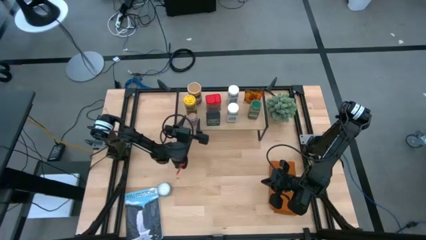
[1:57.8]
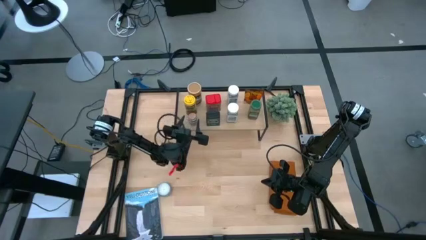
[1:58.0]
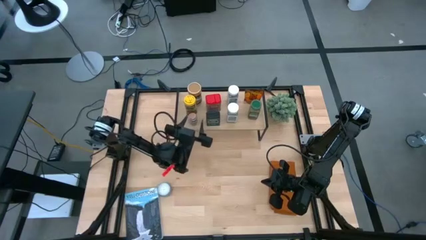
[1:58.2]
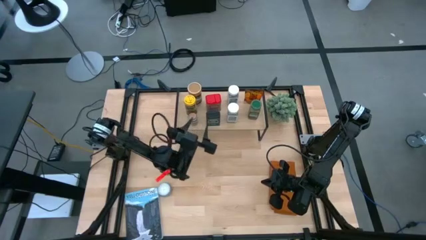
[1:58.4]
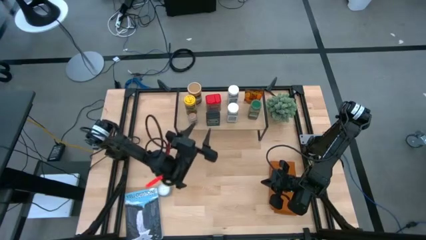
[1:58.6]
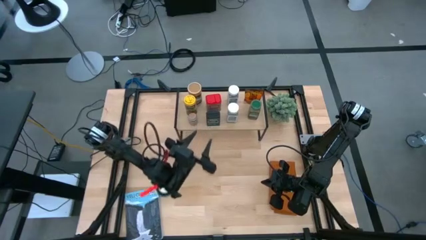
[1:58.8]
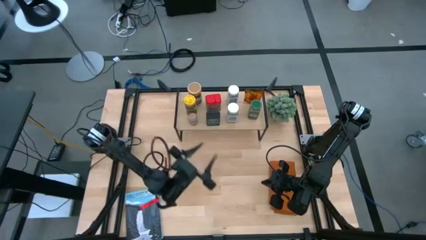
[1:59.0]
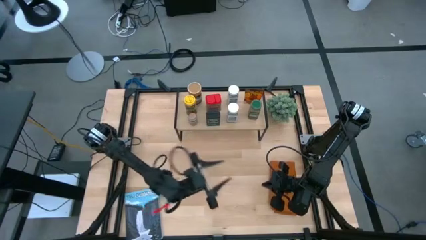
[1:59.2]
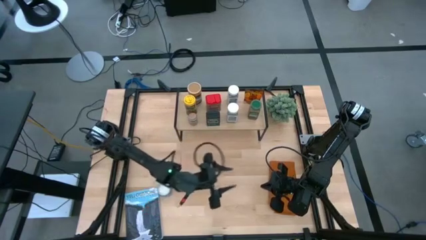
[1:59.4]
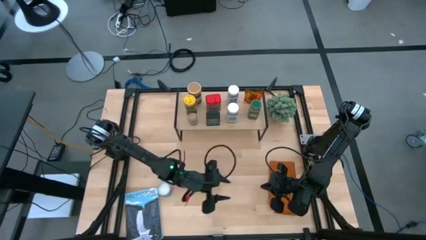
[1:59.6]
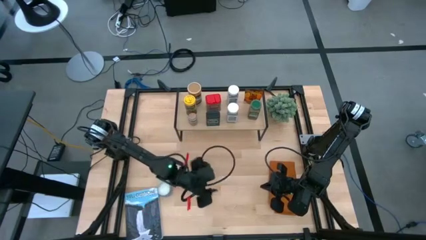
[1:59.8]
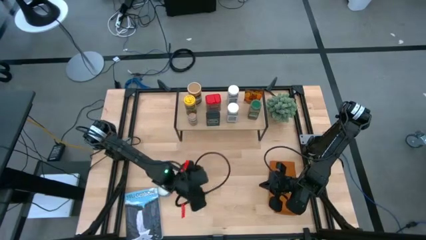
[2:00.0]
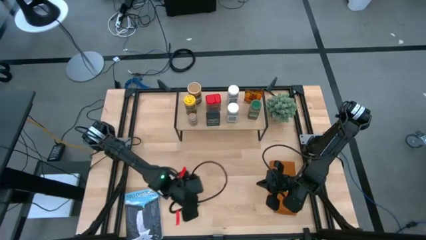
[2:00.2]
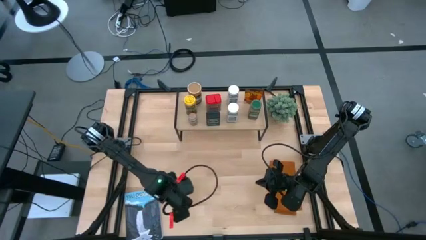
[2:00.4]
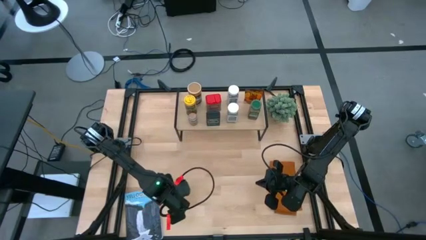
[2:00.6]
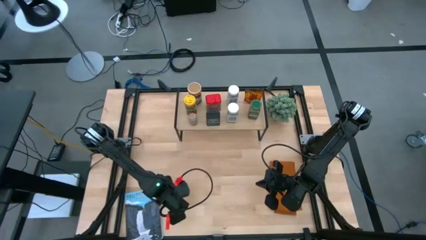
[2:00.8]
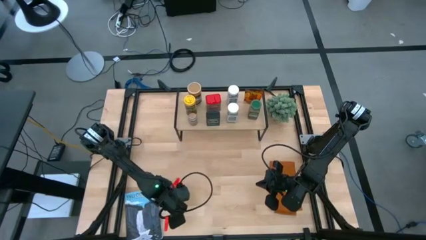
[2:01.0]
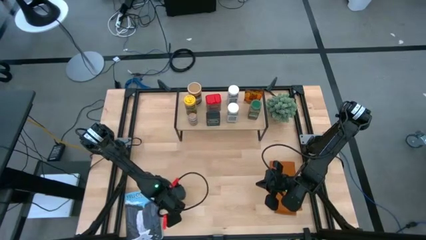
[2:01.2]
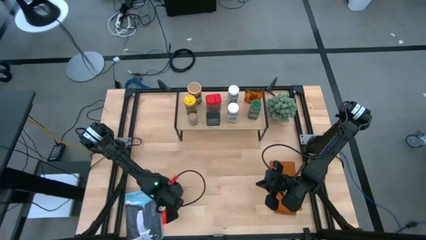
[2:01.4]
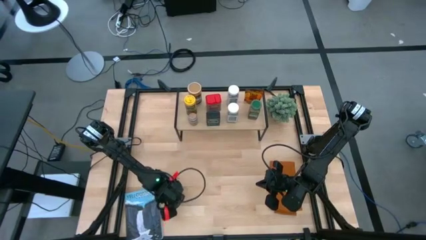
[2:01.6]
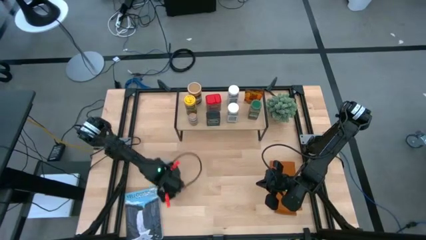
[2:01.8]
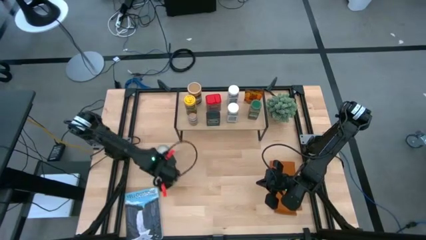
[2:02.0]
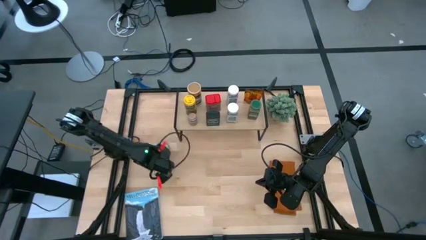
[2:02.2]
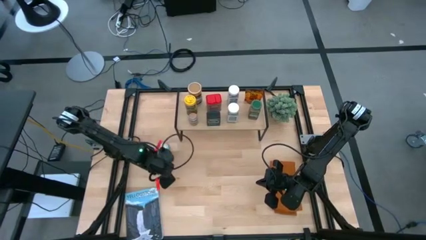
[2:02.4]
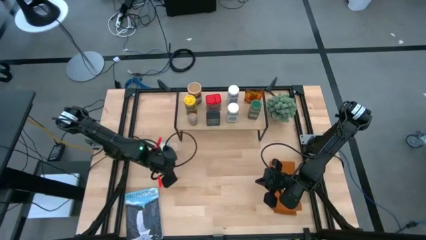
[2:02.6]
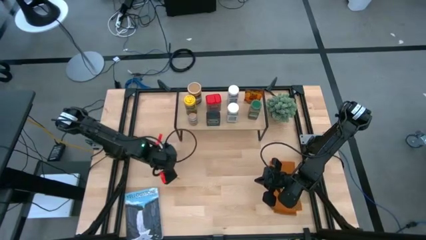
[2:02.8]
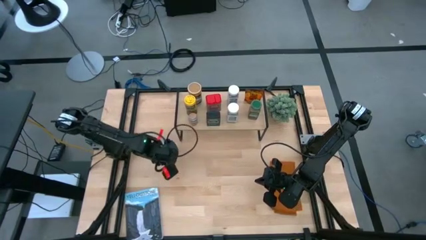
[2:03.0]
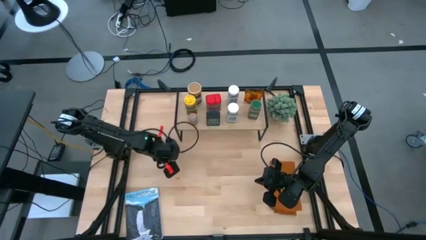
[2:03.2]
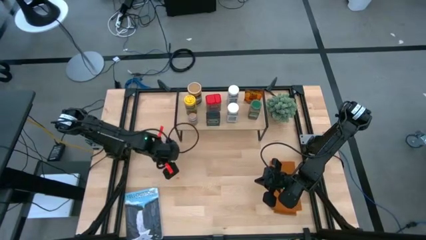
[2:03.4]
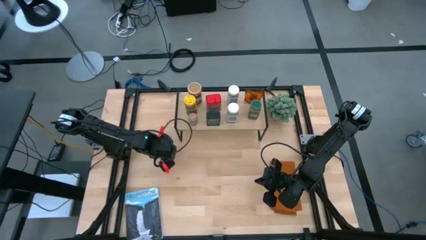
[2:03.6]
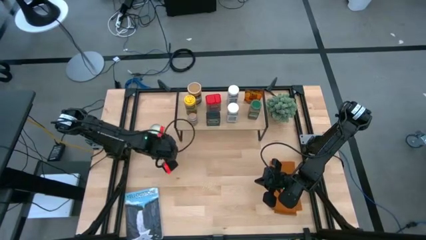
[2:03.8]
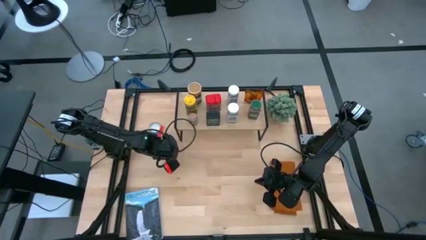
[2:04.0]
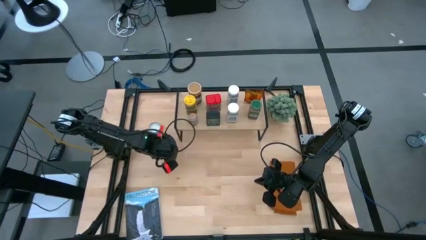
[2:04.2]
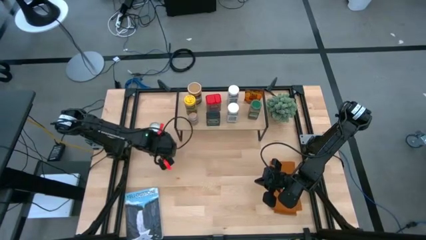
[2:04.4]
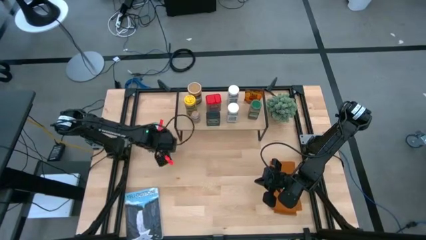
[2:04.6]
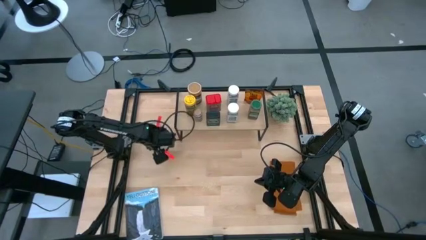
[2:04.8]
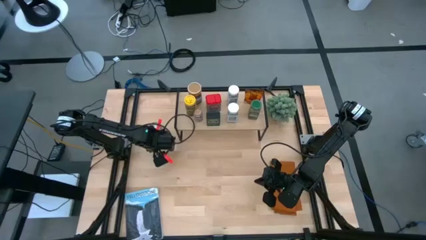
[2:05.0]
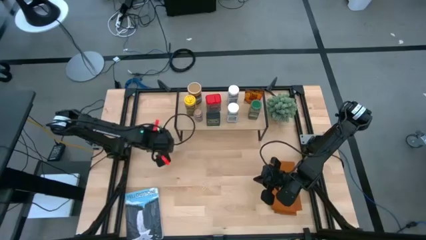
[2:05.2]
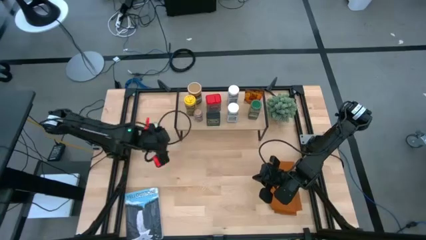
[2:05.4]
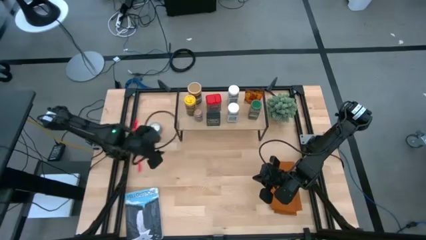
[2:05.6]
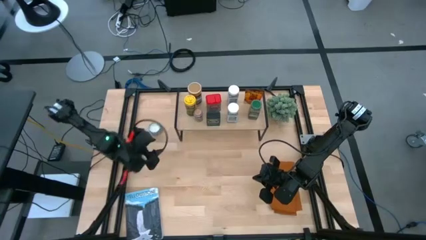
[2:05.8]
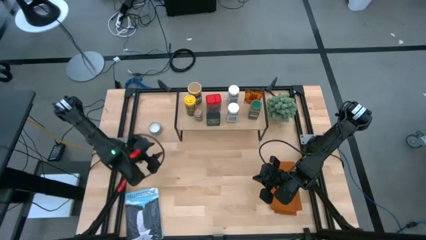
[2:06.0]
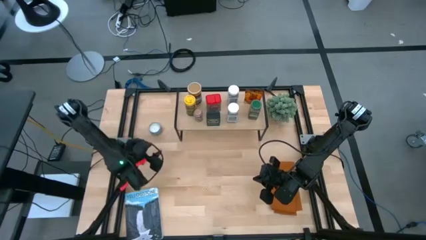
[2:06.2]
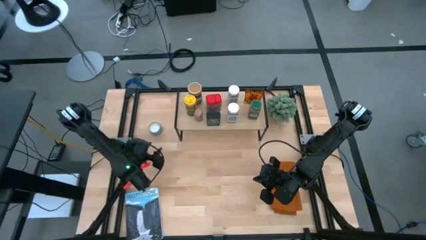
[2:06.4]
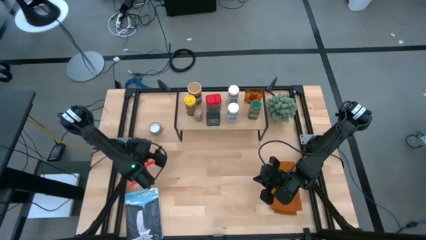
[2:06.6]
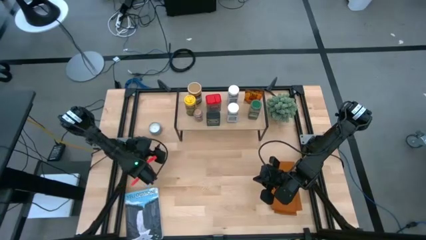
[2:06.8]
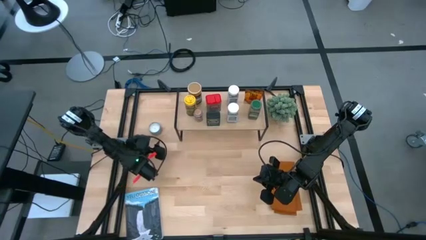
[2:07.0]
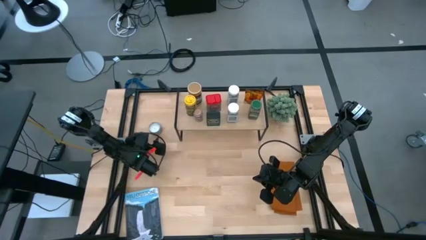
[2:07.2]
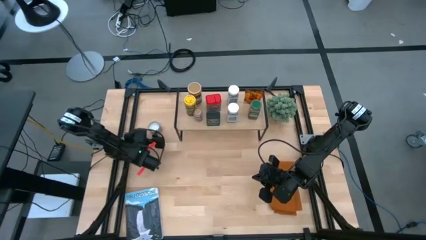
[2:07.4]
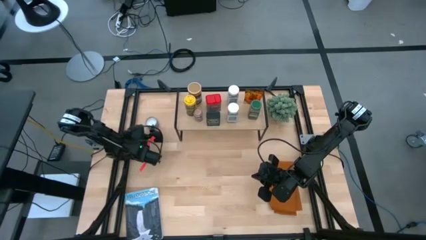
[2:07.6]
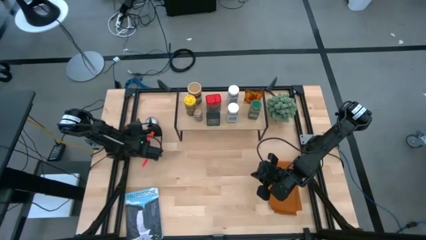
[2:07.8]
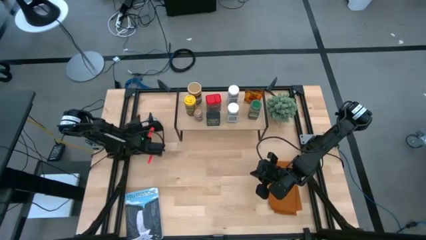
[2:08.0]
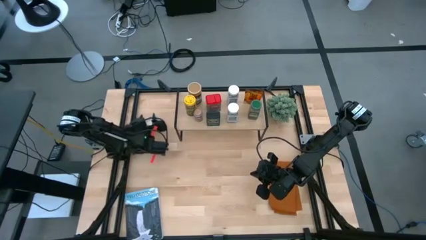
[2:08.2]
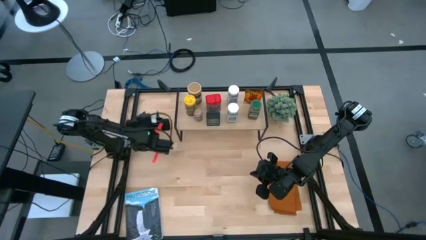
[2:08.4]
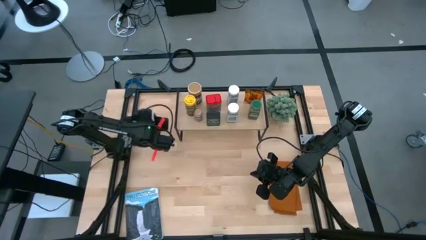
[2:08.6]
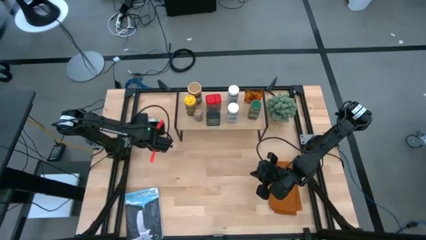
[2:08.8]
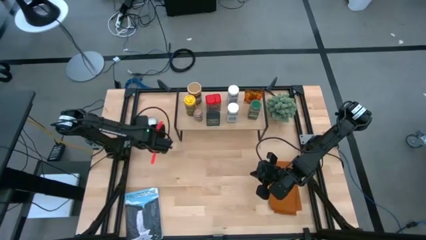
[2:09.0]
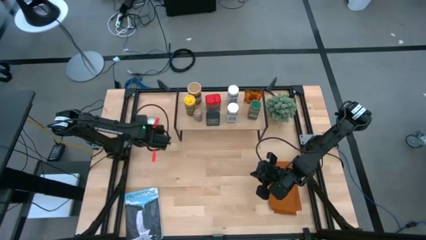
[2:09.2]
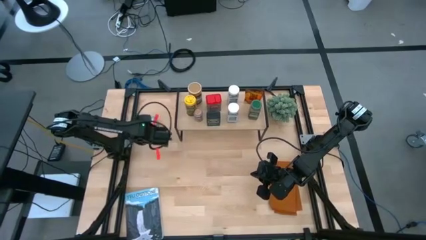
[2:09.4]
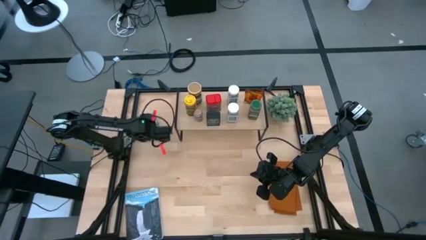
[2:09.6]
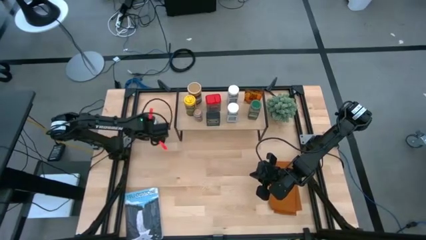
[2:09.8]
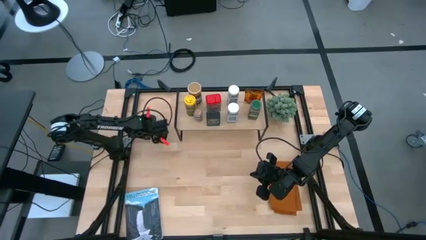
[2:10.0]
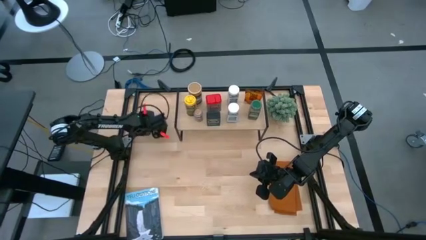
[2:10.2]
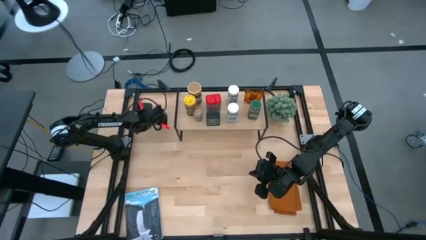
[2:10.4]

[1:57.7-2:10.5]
Task: Shelf spices
Move the white candle to the top left of the table

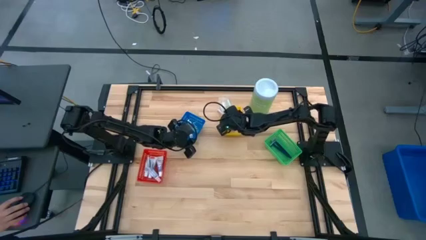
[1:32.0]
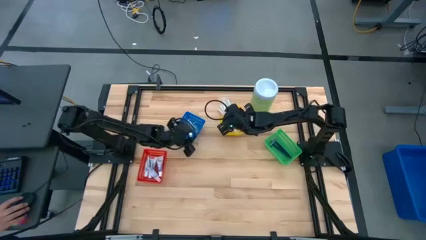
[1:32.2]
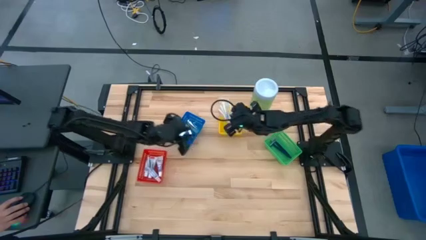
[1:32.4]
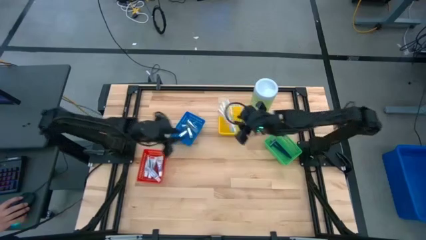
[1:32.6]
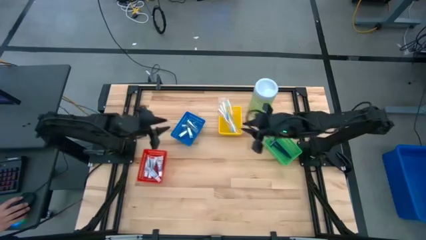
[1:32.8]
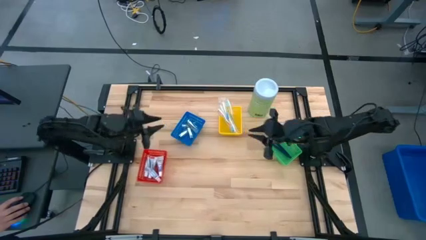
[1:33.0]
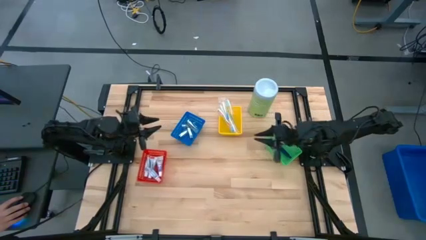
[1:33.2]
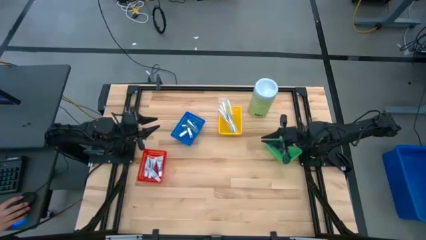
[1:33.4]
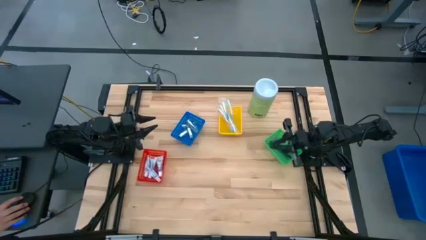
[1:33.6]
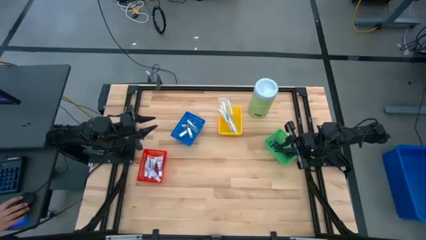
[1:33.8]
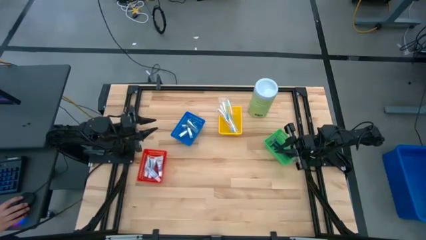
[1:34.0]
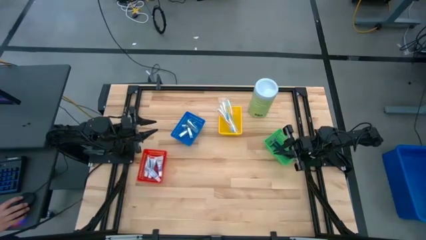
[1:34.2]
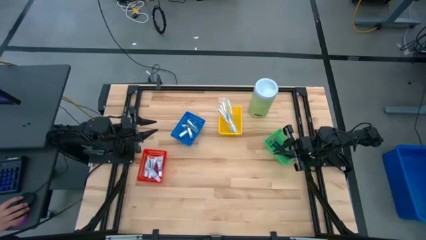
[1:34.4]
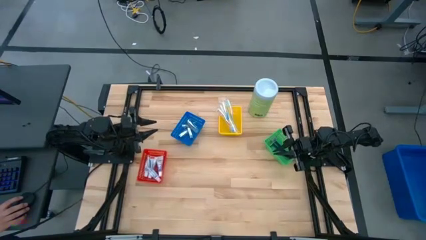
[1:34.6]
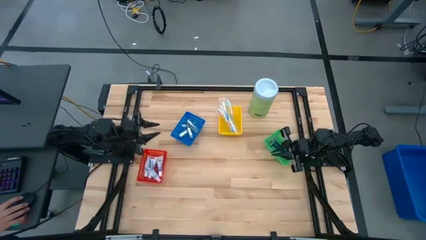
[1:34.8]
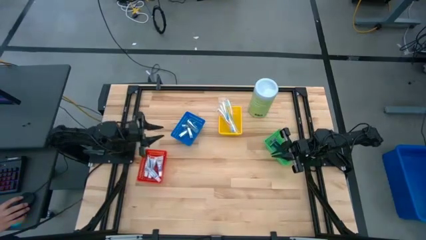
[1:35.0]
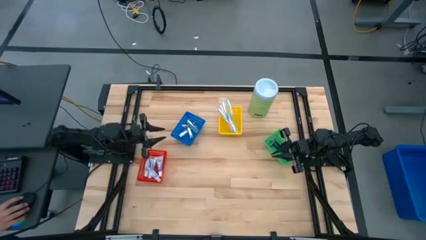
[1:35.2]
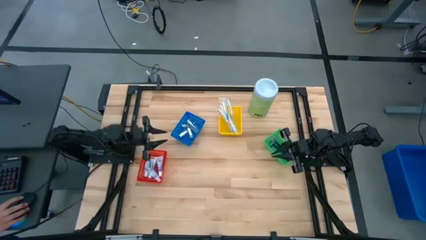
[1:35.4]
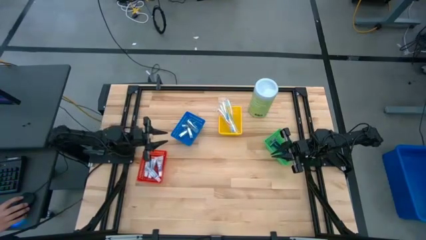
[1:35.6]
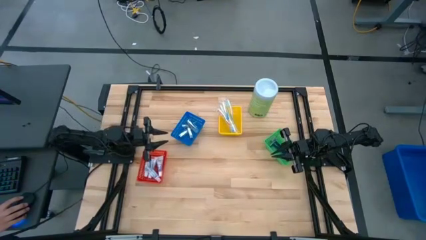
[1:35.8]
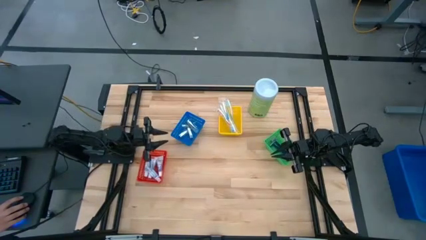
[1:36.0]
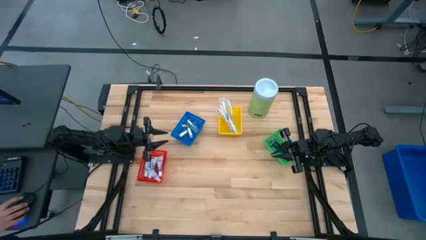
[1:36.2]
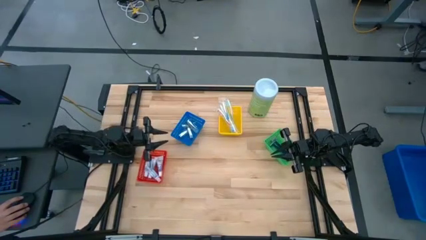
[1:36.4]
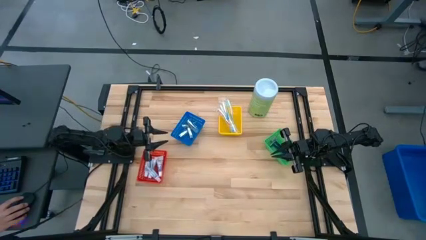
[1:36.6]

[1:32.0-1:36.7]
Task: Pick & Place Travel size toiletries
Return to Home Position
